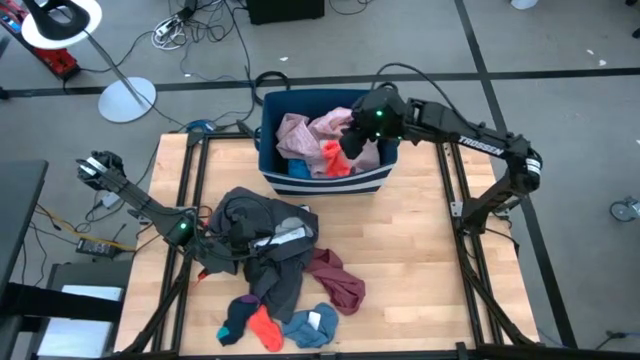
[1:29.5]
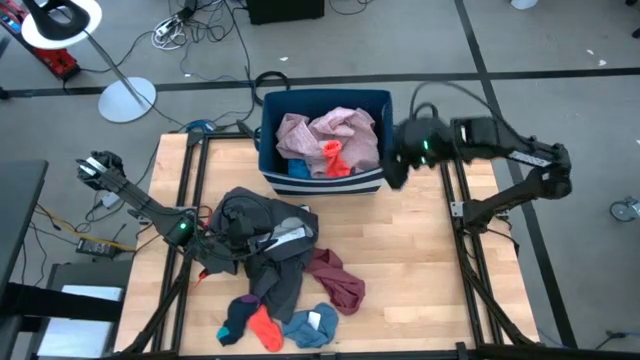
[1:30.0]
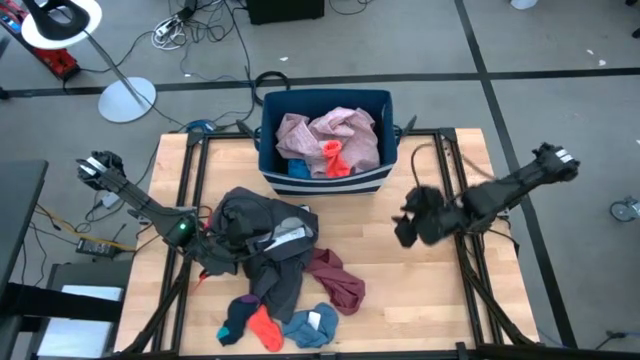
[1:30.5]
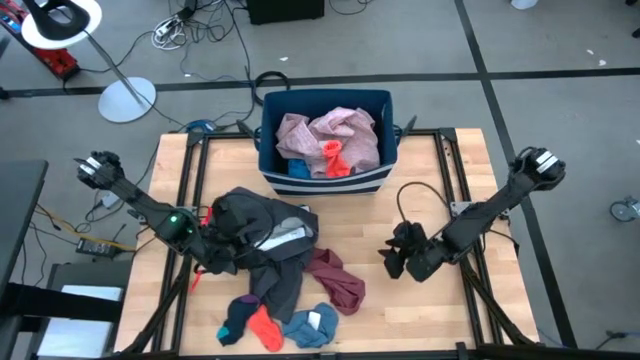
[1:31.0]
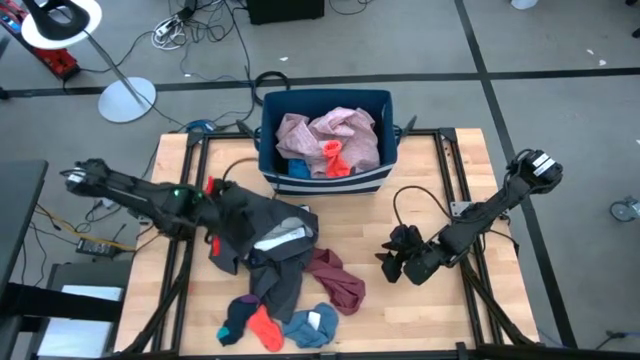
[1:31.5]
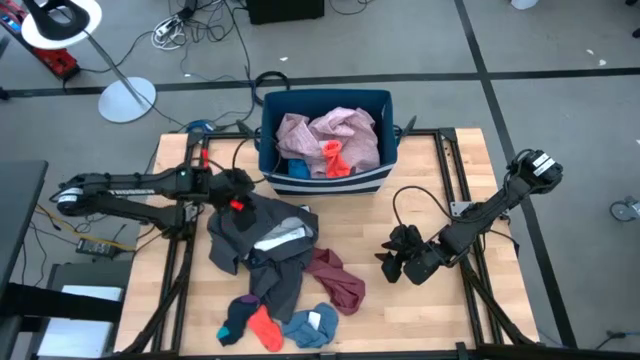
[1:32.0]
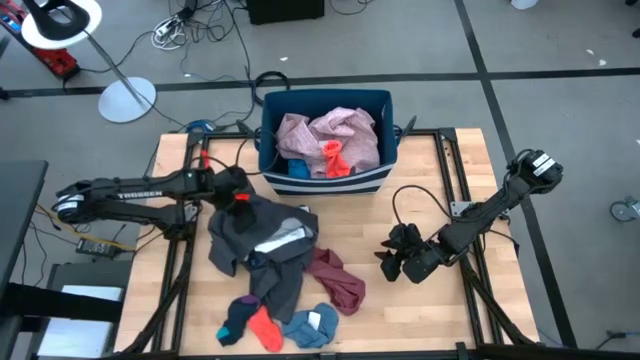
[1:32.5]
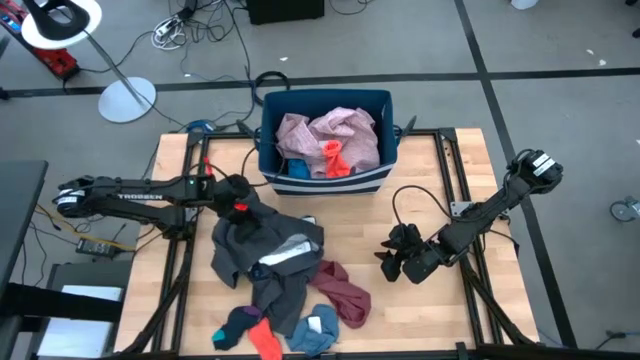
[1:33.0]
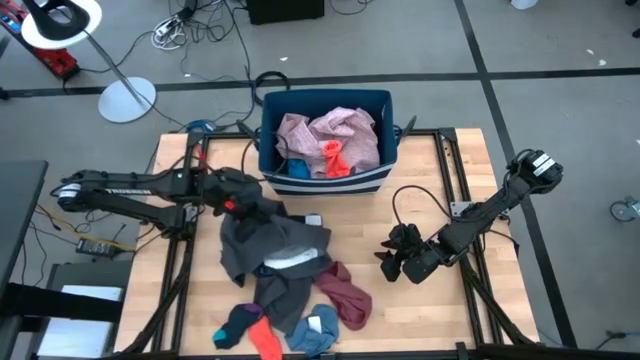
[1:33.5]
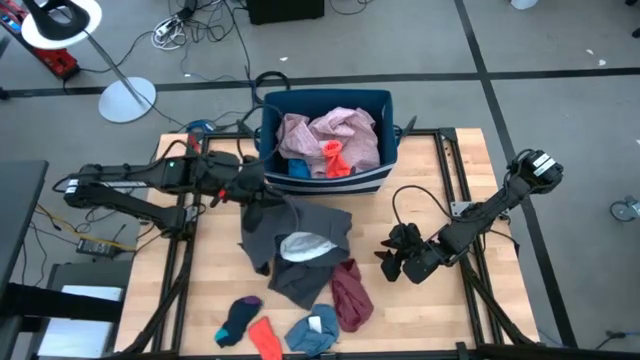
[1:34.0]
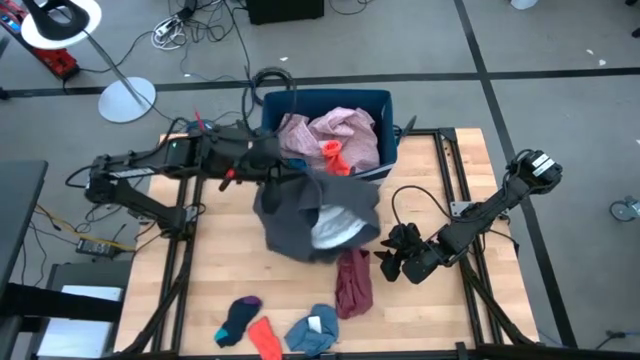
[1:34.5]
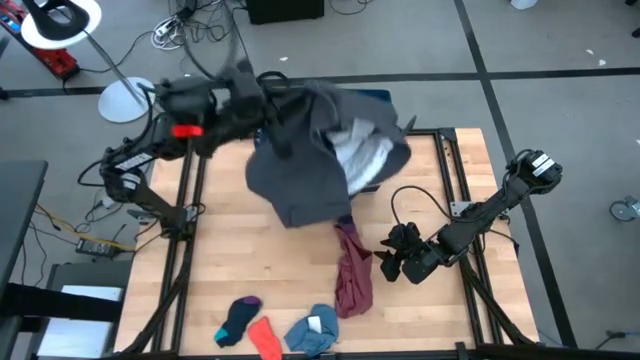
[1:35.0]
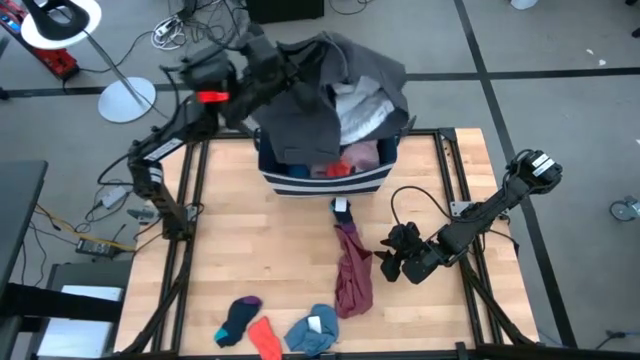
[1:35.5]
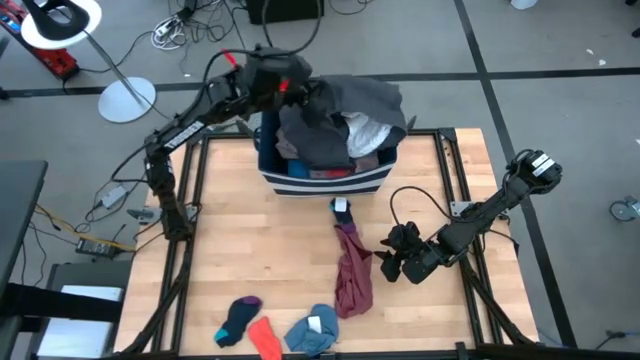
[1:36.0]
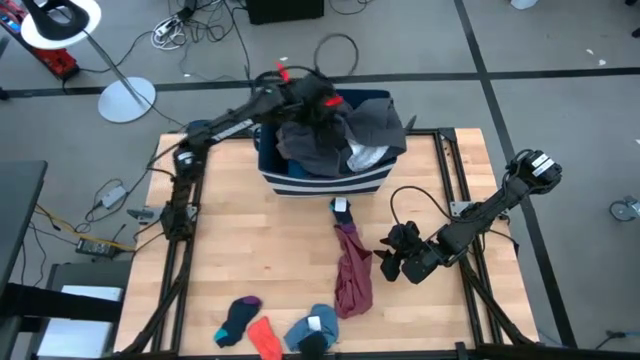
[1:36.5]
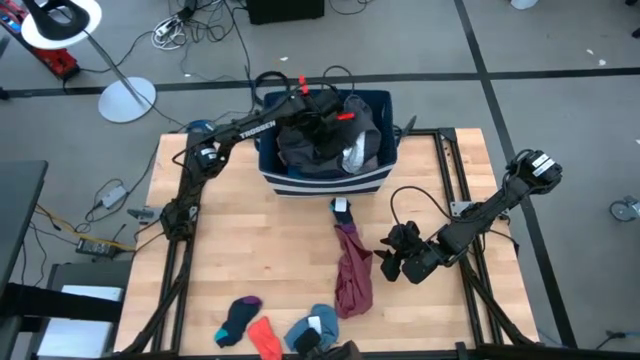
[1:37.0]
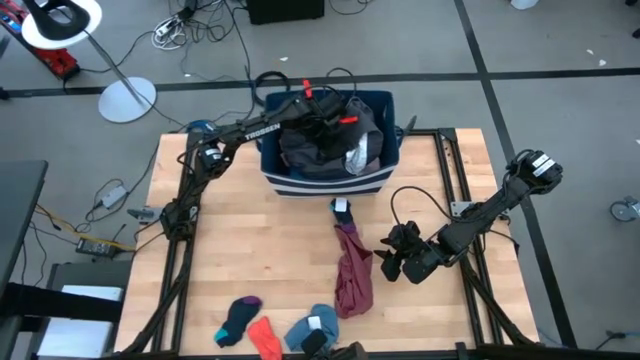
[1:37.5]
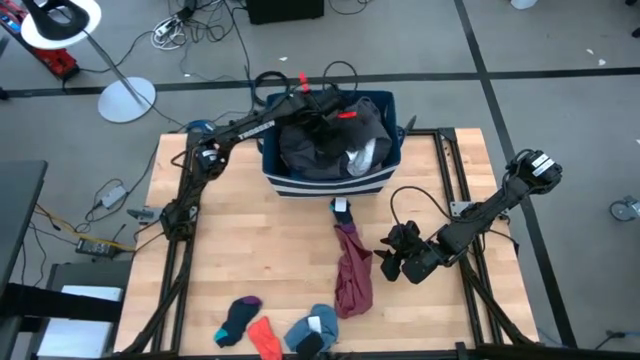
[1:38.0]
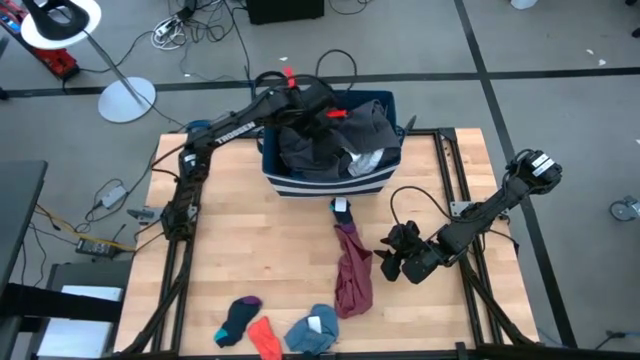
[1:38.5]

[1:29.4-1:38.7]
Task: Sort clothes
Put the gray short into the laundry bin

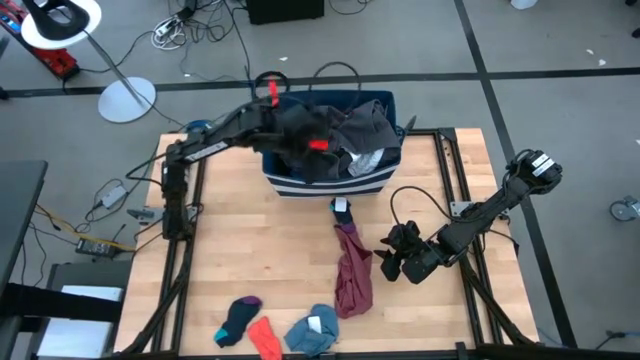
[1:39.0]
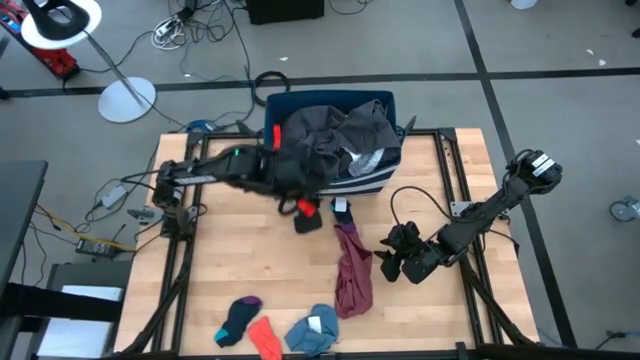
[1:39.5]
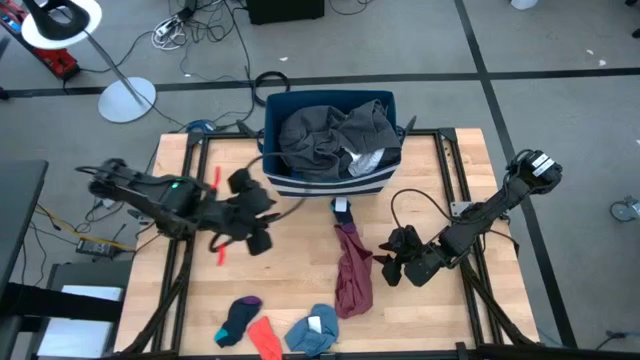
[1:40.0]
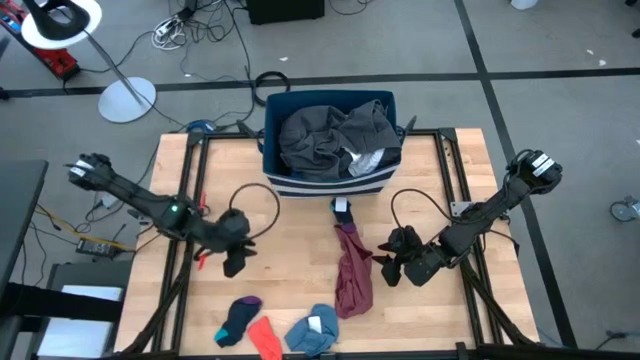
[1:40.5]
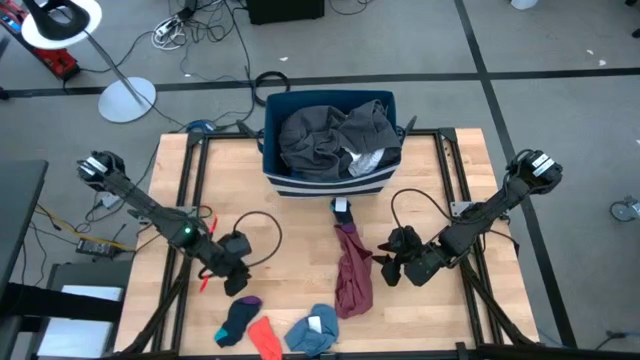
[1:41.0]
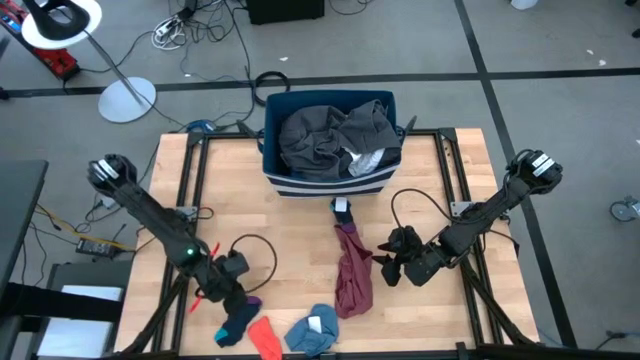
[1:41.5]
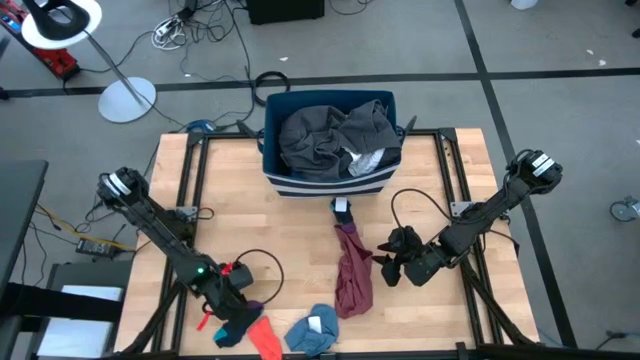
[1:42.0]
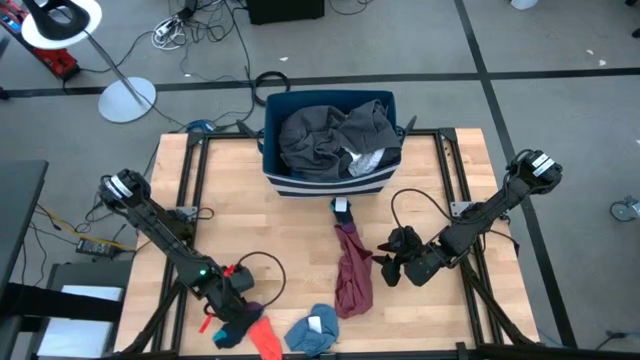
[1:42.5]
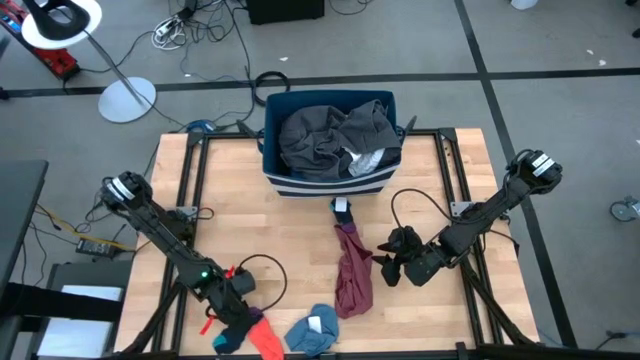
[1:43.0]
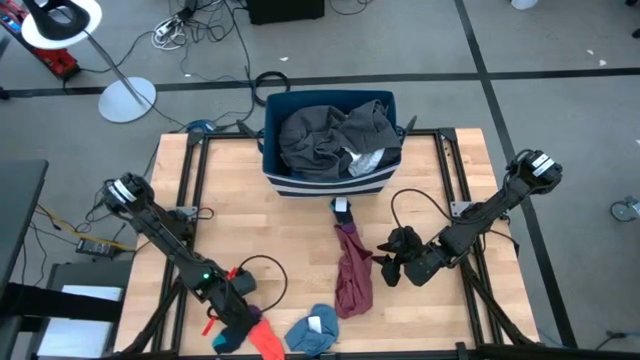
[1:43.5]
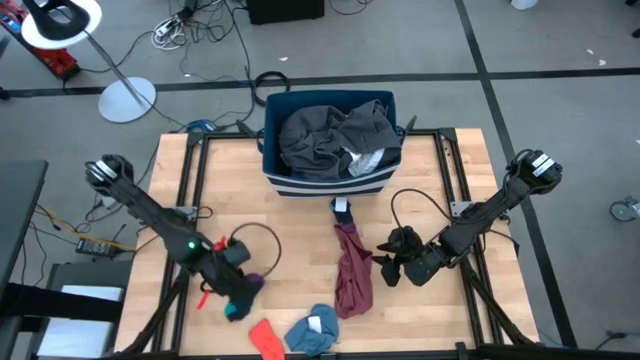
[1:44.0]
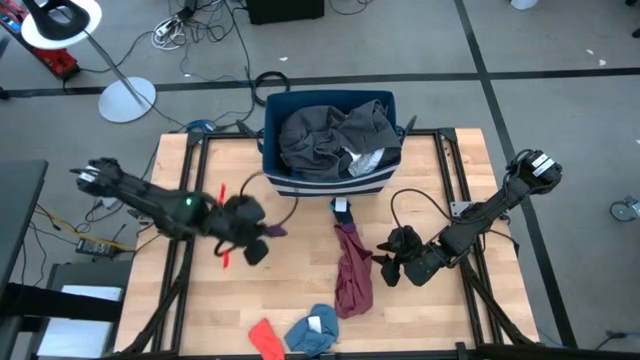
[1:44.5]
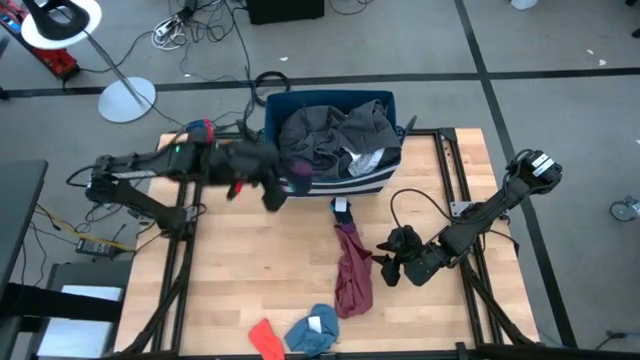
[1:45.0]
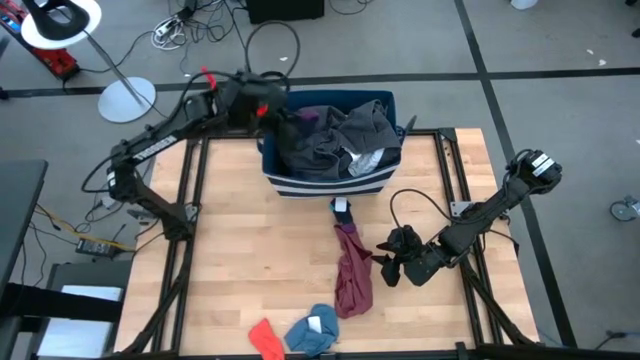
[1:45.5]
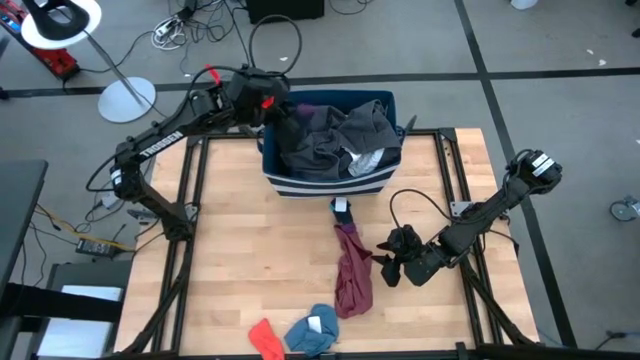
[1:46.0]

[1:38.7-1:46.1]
Put the left purple sock into the laundry bin

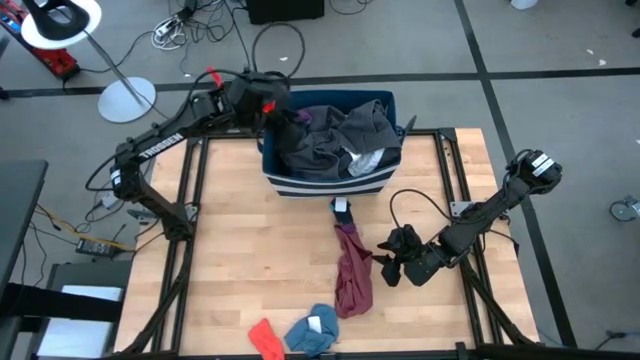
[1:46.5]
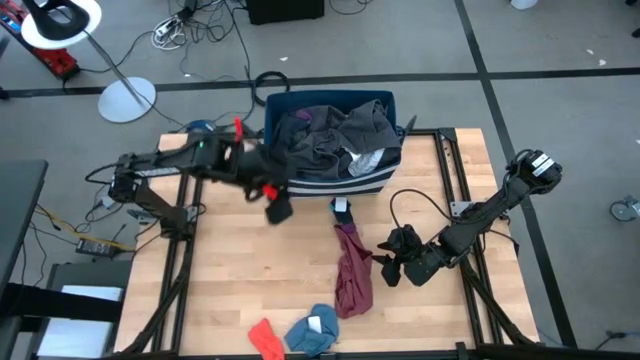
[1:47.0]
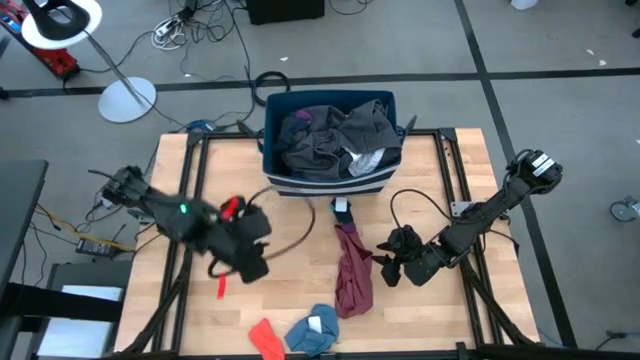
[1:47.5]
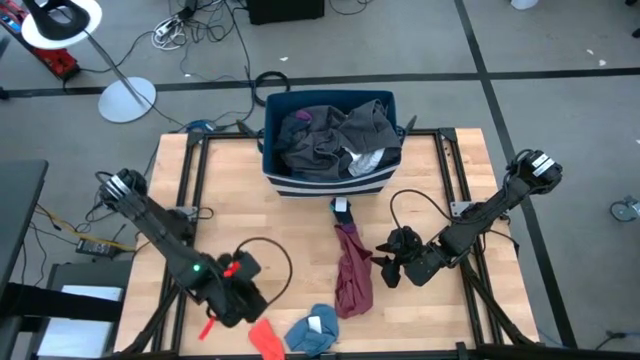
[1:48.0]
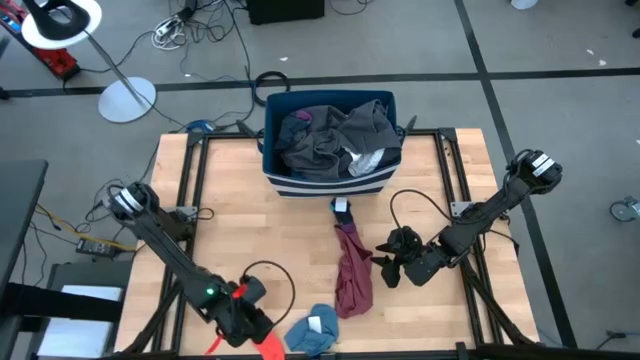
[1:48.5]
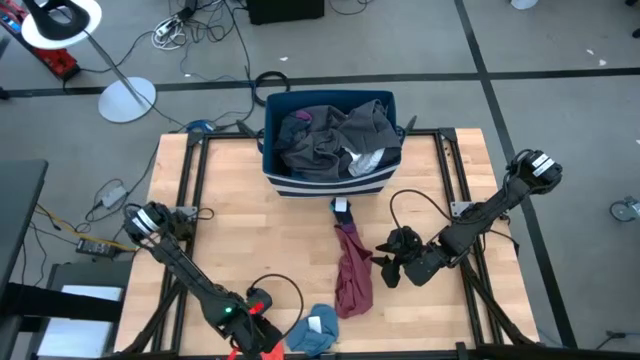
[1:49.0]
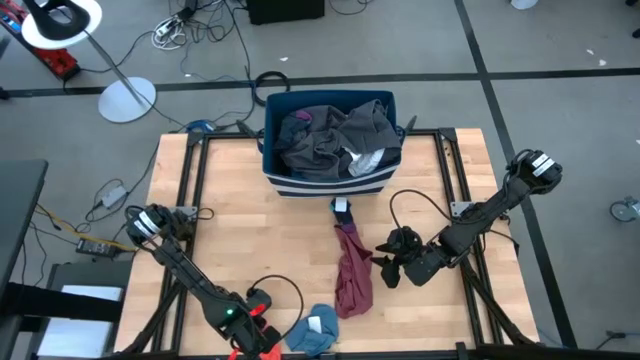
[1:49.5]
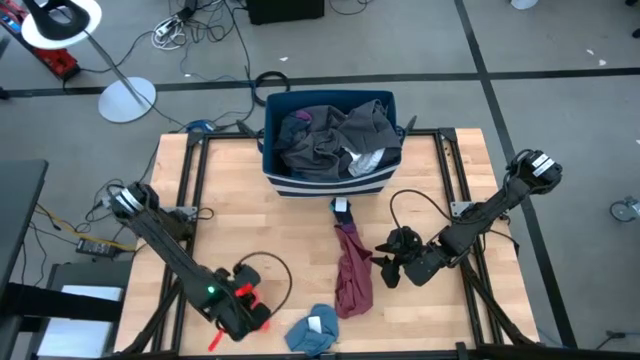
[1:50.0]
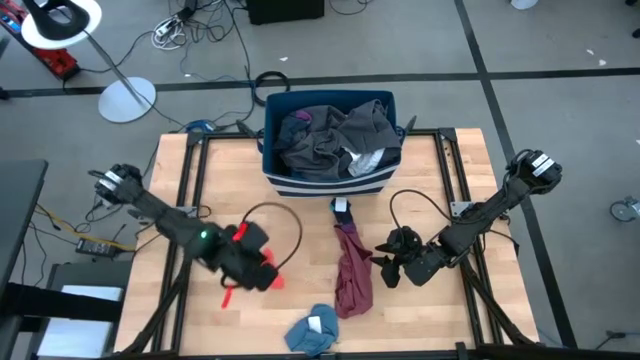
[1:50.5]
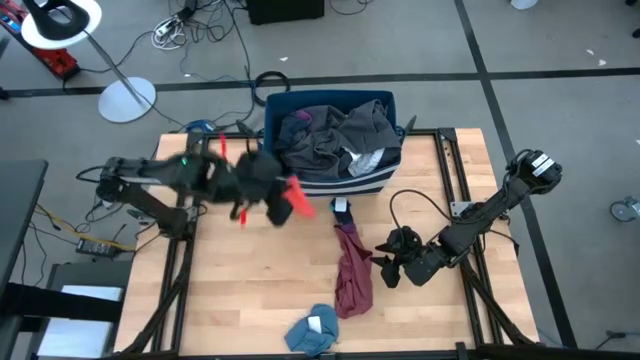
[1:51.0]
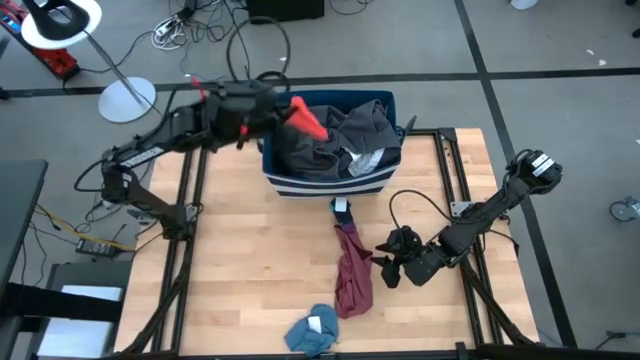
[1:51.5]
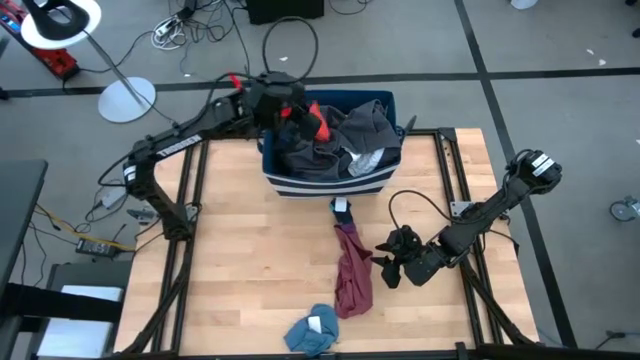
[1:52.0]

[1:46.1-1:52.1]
Put the orange sock into the laundry bin
